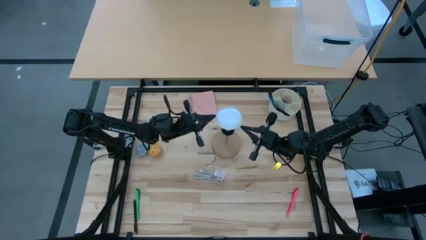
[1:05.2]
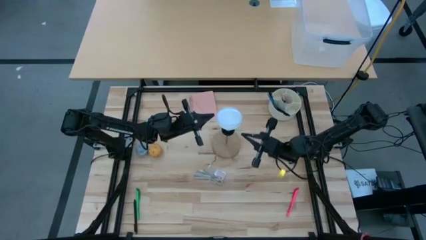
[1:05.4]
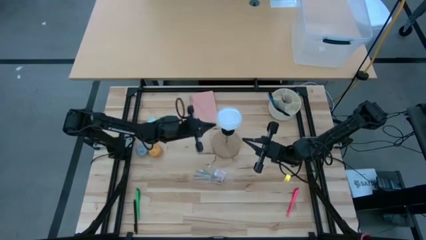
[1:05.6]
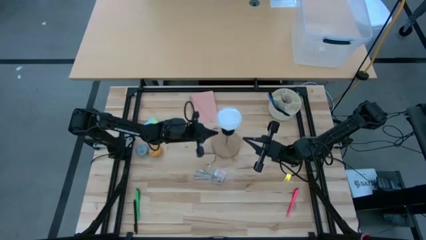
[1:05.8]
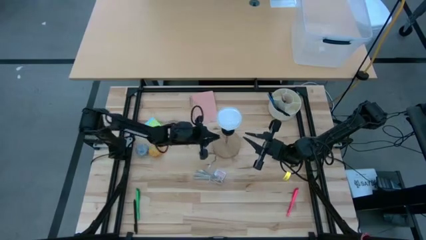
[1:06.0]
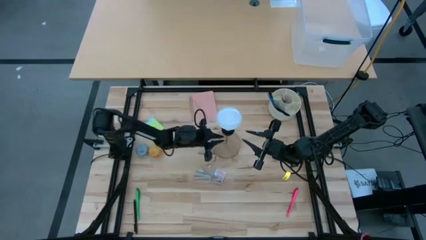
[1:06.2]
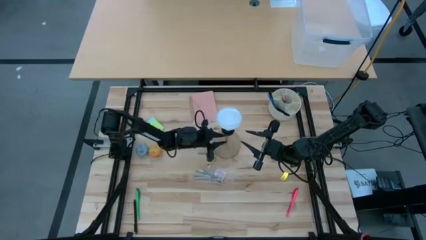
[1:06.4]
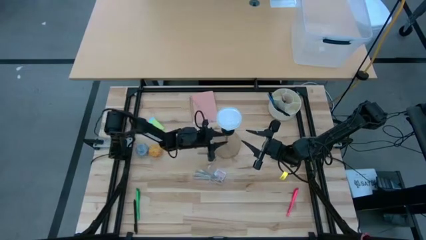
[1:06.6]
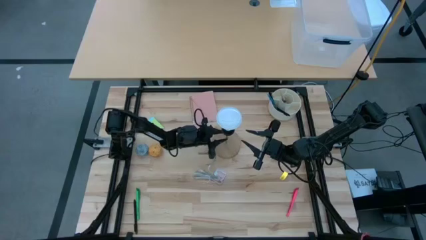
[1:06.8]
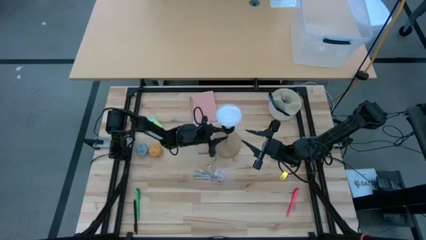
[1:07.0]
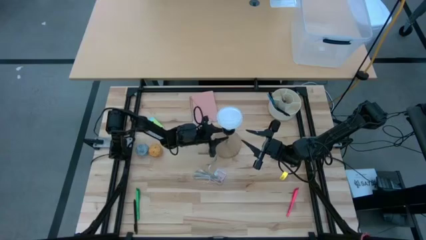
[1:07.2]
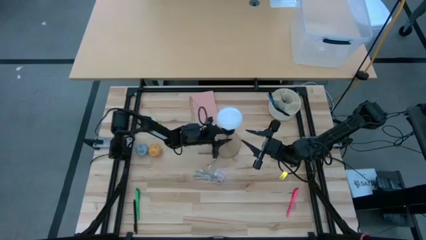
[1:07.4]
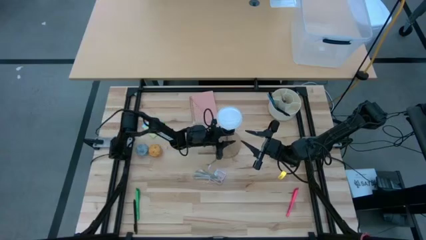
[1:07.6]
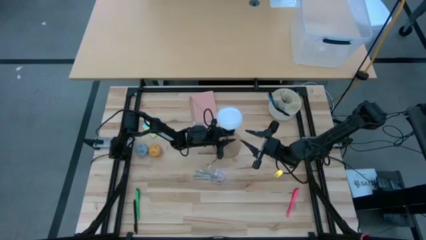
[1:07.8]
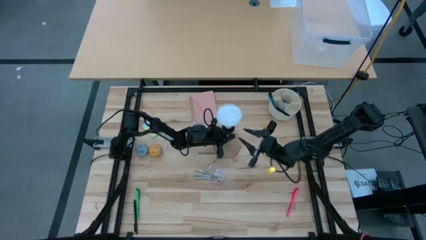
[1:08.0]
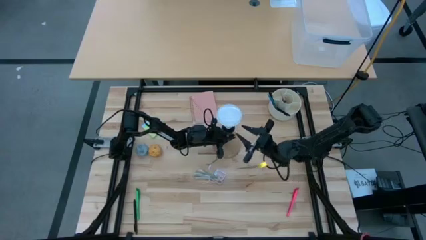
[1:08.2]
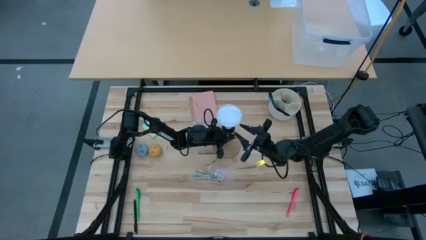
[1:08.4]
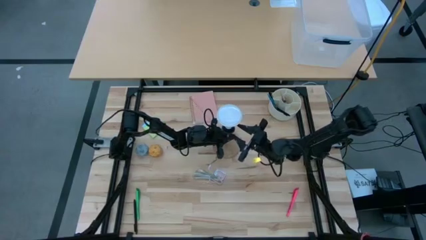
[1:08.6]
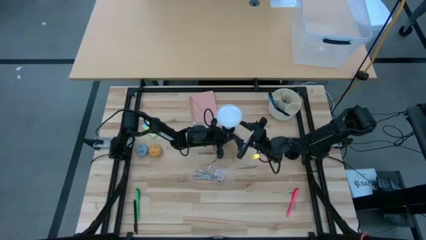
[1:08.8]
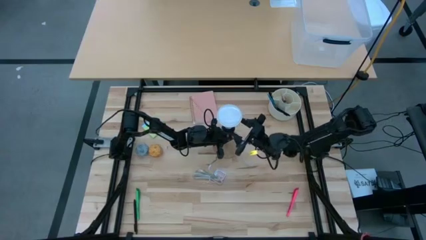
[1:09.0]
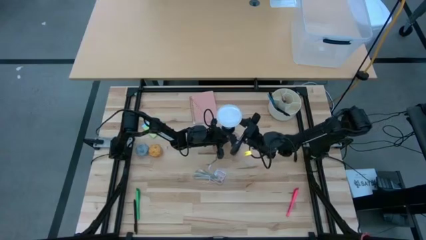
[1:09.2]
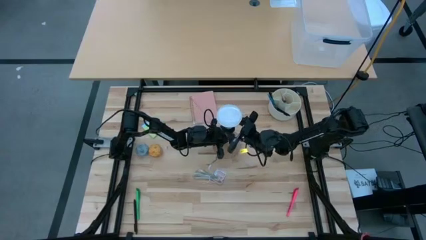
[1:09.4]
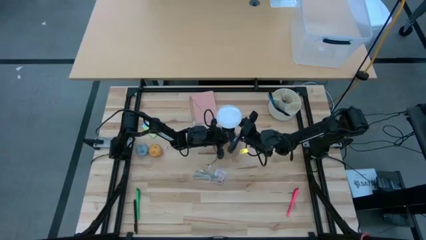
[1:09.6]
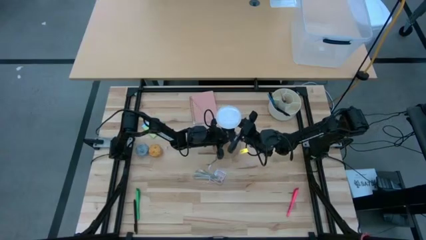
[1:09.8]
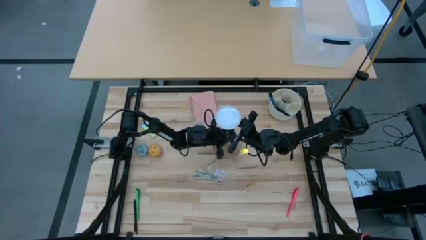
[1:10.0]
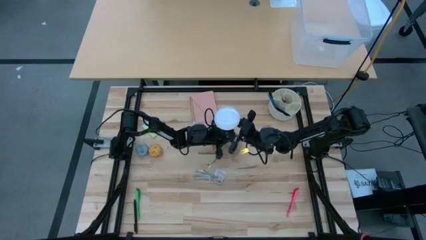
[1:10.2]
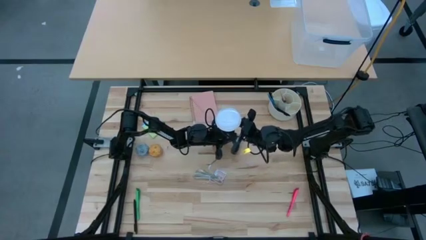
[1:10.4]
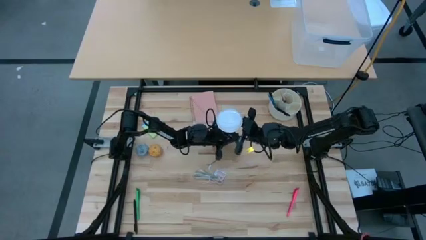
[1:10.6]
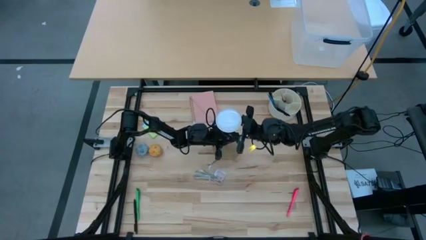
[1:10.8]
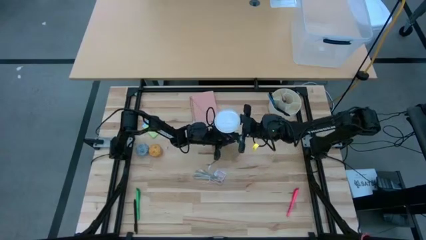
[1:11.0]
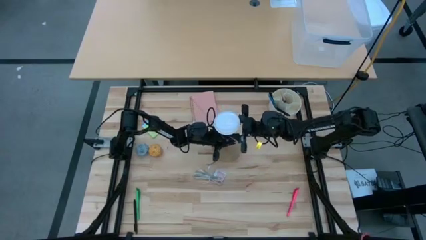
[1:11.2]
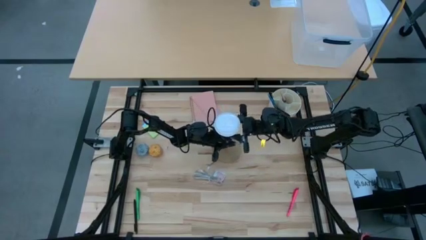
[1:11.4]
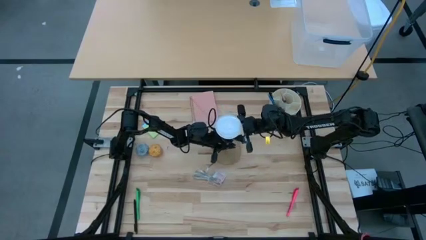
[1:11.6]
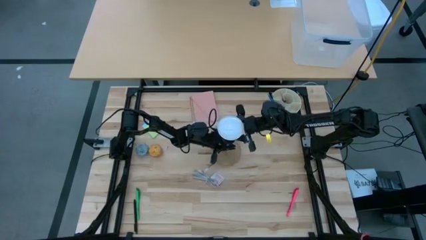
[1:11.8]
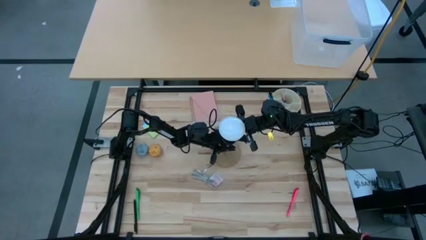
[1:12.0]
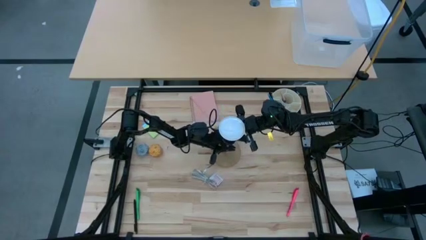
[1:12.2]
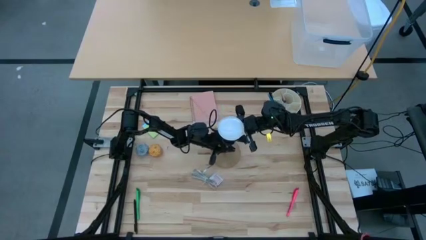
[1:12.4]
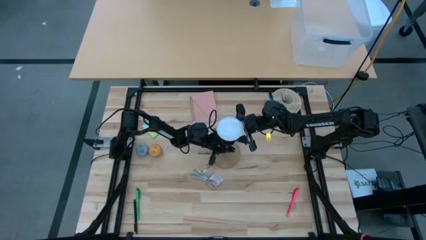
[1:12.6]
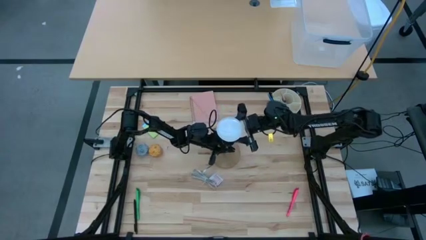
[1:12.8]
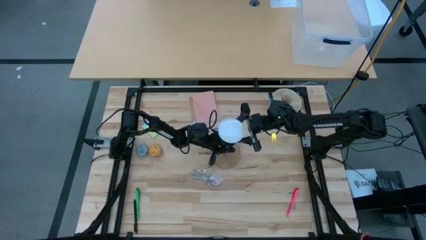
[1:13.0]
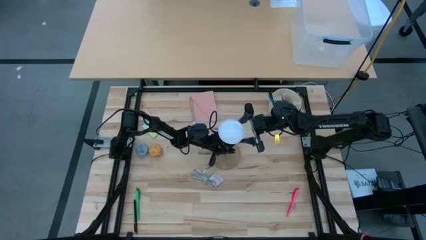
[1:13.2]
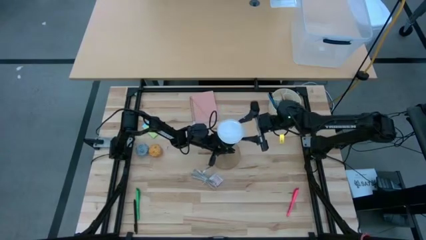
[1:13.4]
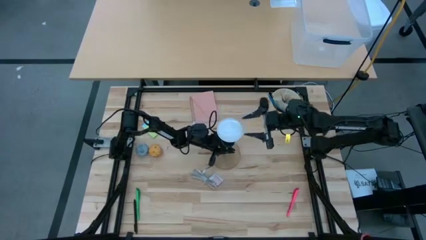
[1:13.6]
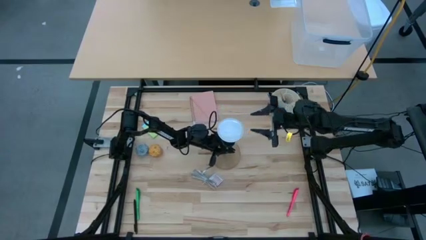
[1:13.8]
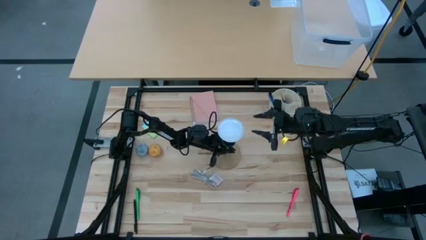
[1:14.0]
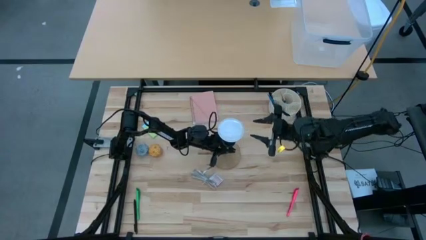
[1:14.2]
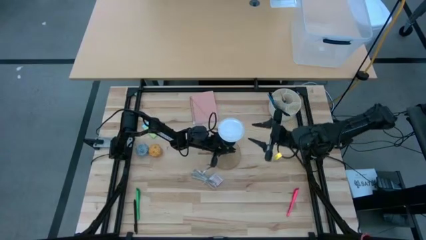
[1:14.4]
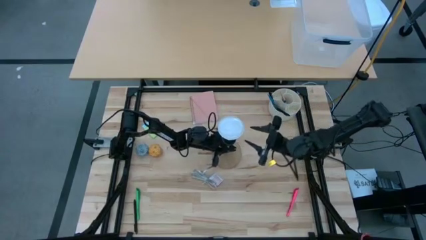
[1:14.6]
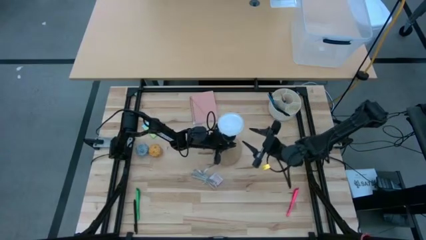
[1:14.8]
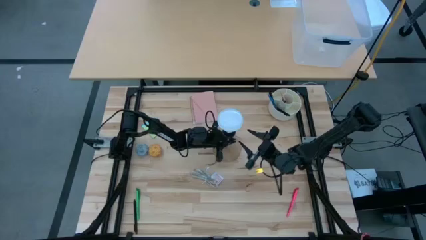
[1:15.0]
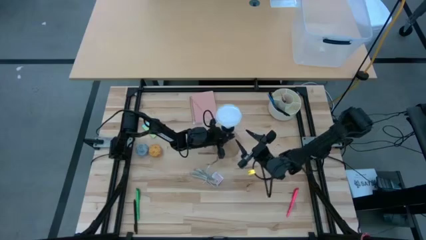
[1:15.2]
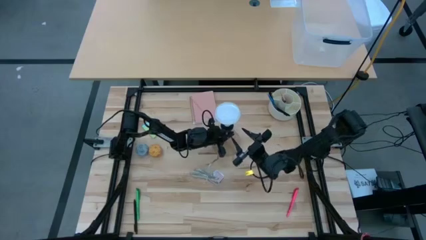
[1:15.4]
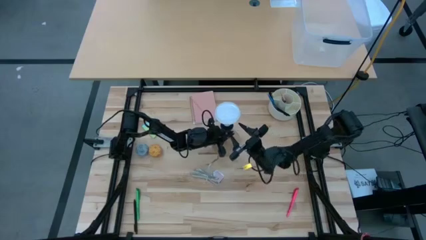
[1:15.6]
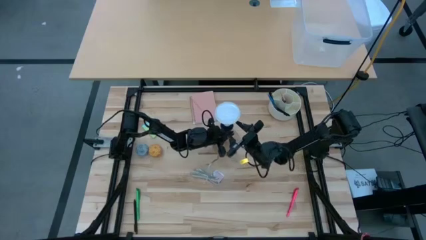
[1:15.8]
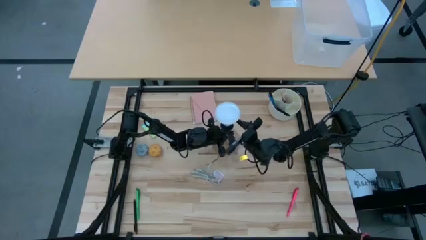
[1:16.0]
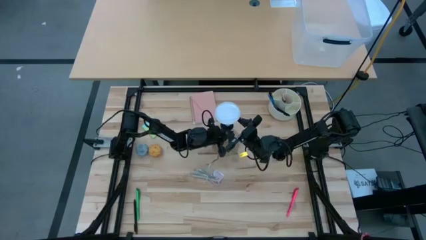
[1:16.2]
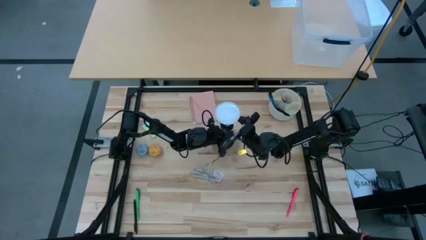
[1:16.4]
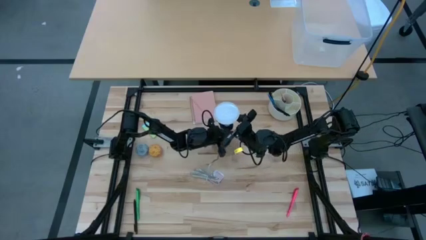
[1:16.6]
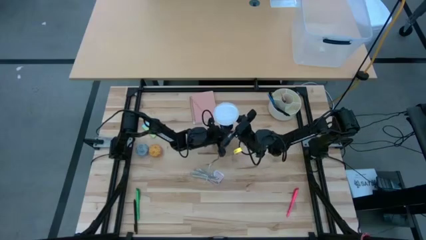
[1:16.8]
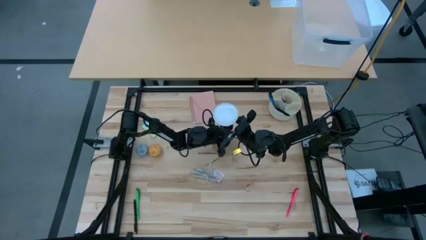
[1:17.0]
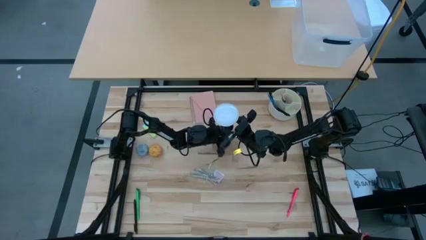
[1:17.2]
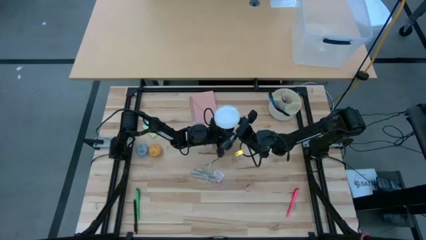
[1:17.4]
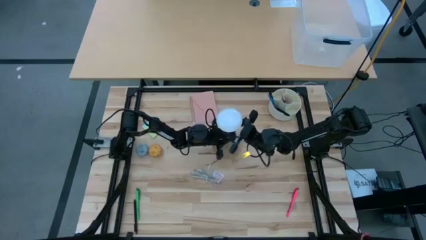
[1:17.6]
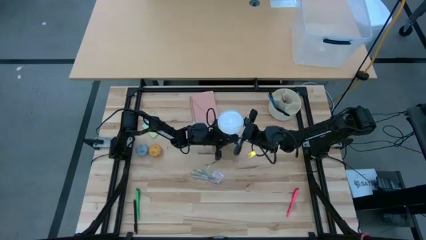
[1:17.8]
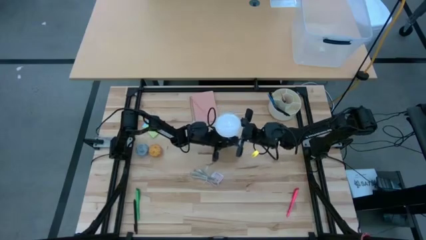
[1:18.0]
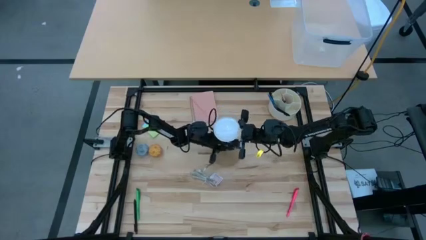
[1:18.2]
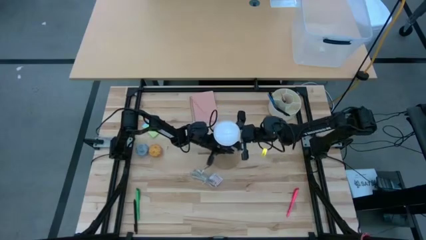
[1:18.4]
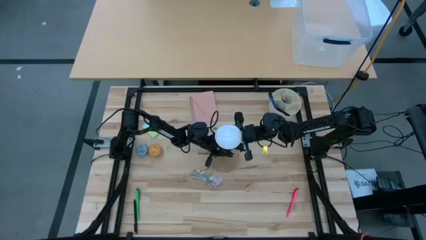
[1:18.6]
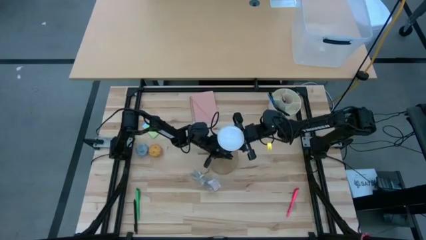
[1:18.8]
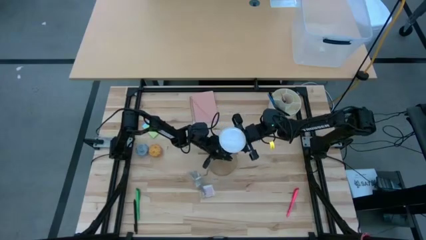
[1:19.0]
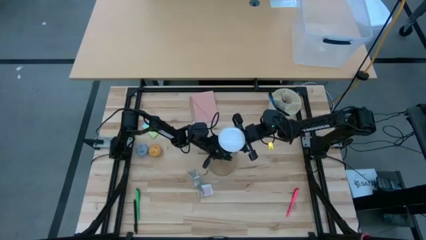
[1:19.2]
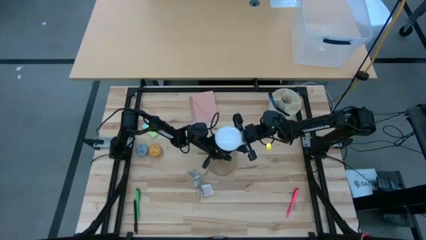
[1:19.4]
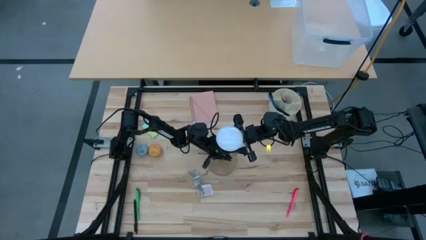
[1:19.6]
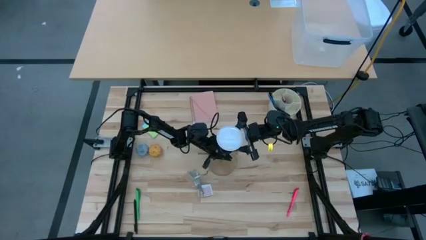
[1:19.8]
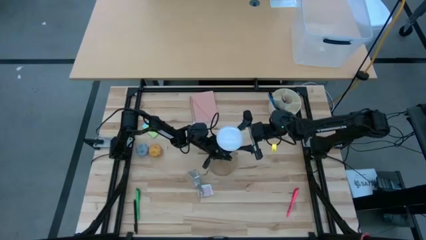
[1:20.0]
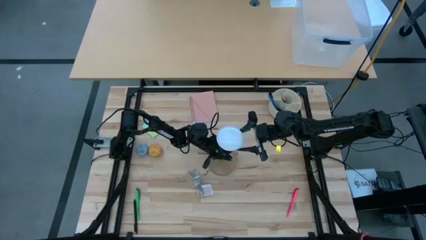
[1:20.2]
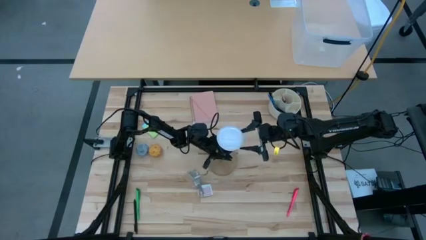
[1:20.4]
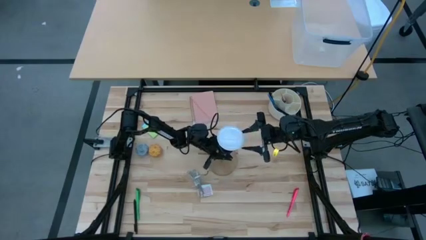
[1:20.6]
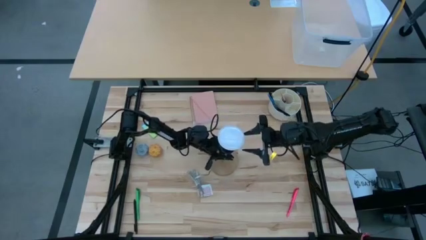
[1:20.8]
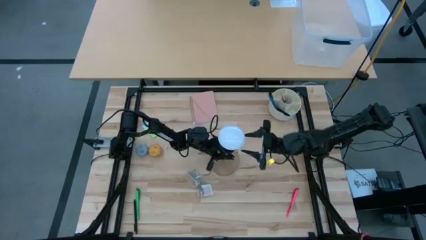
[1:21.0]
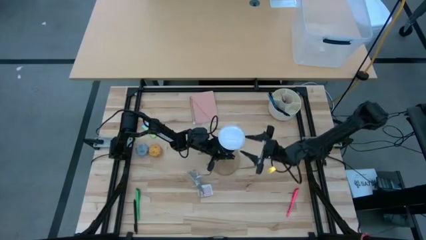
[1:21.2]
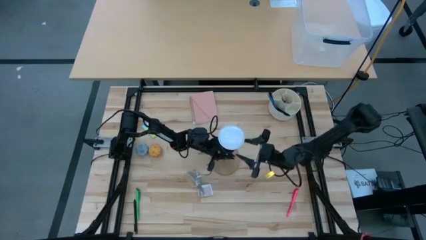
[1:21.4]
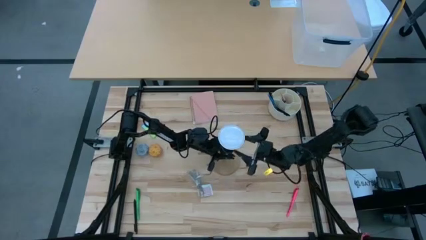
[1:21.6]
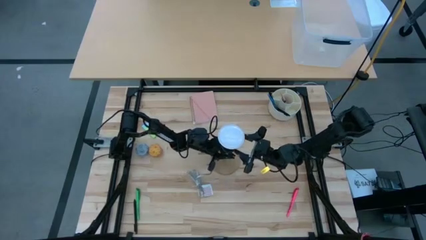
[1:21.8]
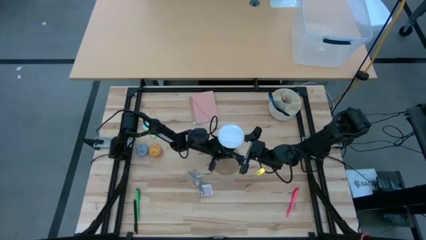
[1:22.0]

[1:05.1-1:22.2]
Task: Screw lightbulb
Remove the lightbulb from the lamp
